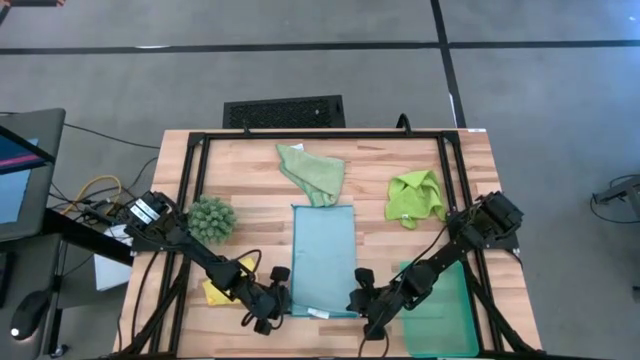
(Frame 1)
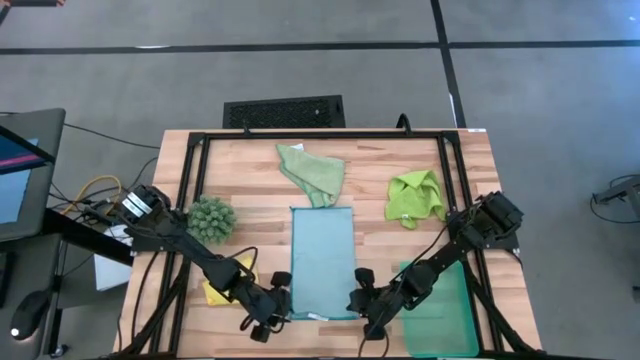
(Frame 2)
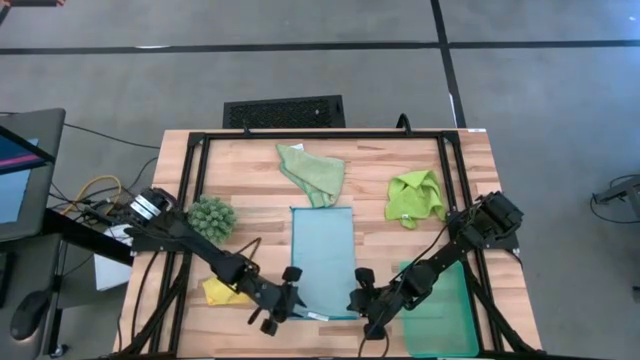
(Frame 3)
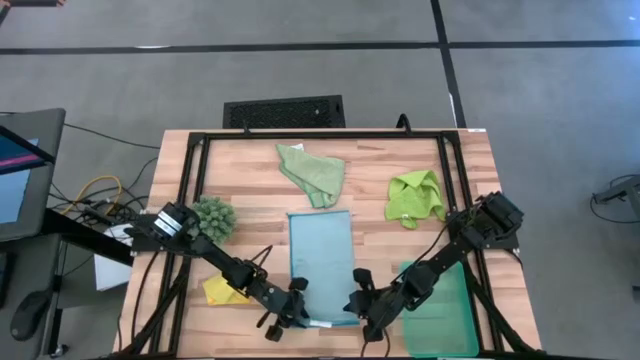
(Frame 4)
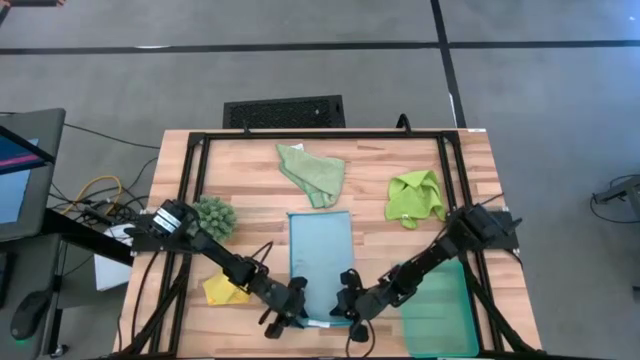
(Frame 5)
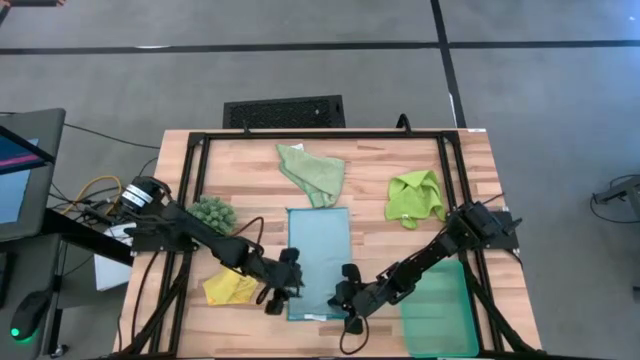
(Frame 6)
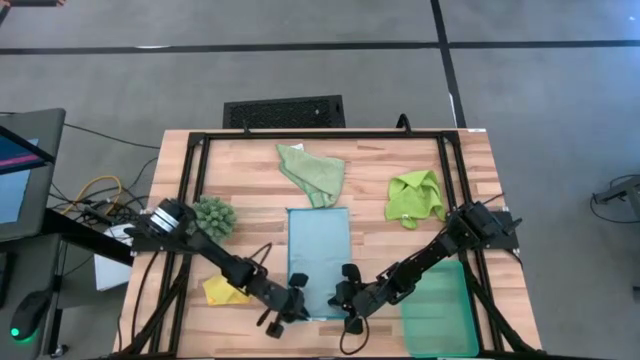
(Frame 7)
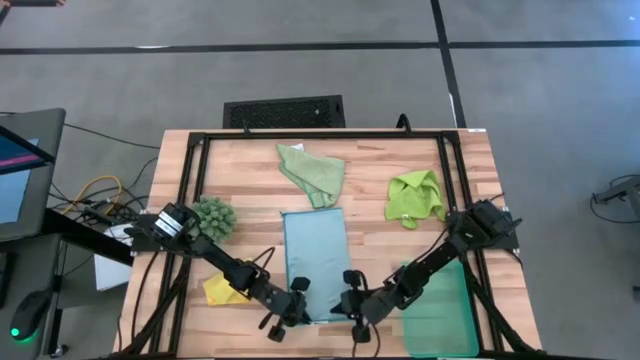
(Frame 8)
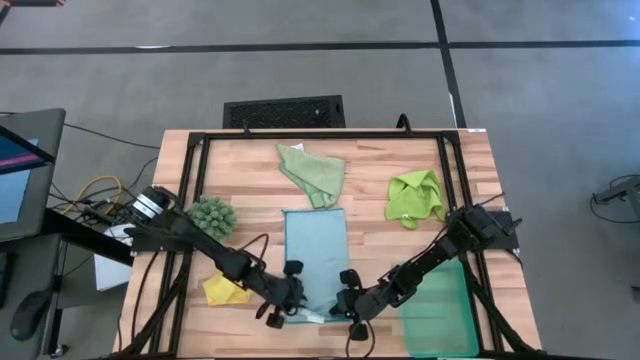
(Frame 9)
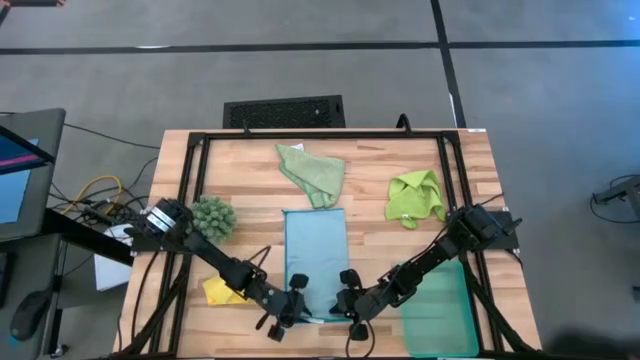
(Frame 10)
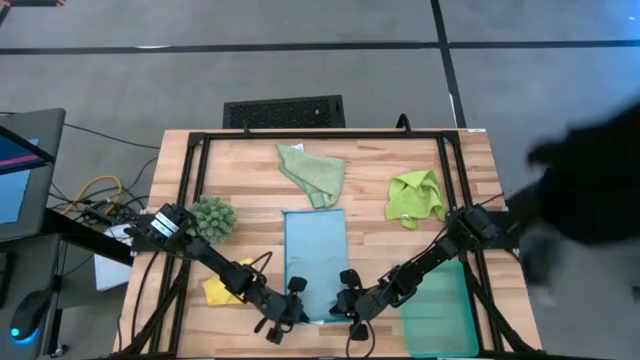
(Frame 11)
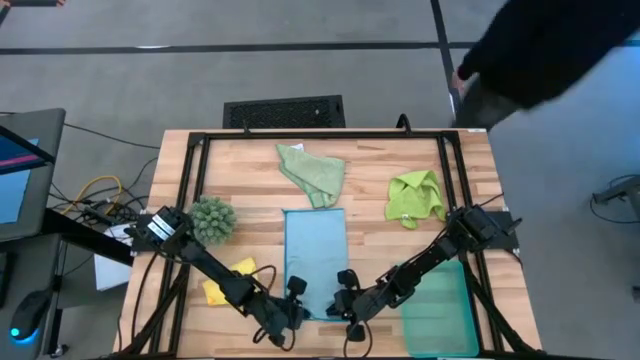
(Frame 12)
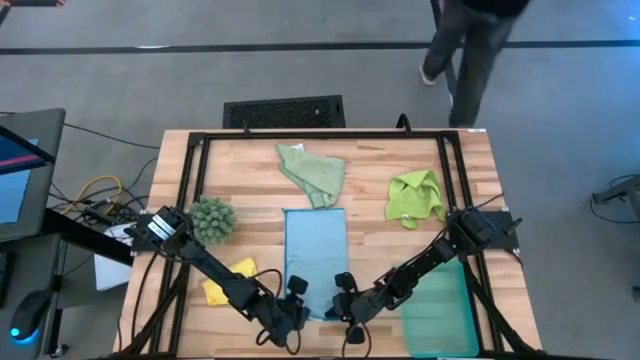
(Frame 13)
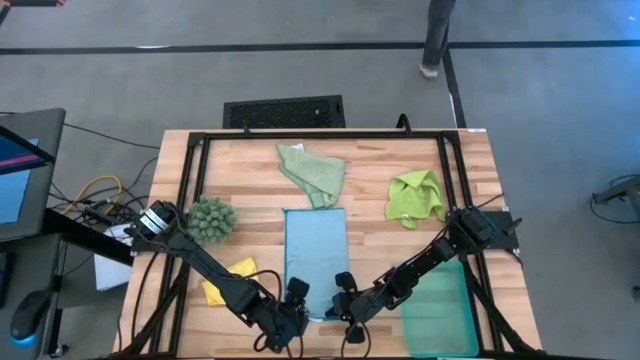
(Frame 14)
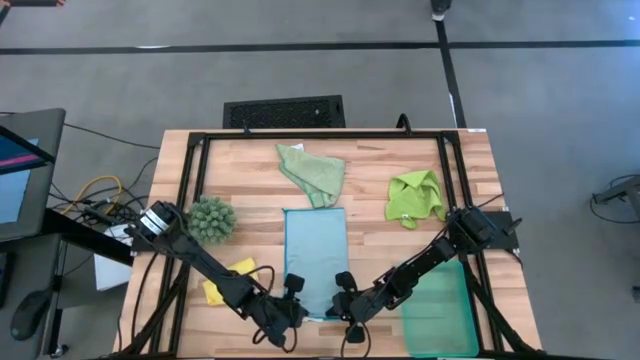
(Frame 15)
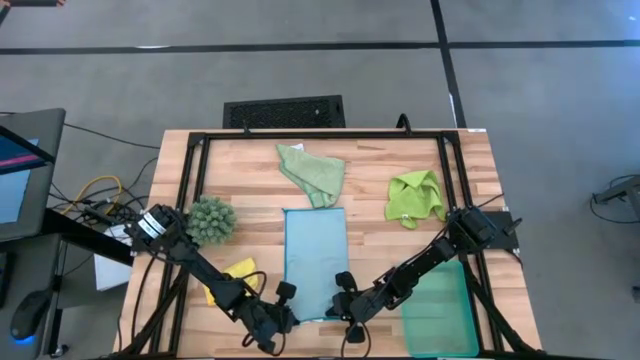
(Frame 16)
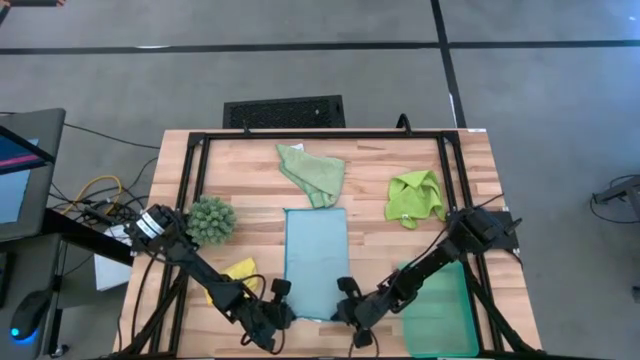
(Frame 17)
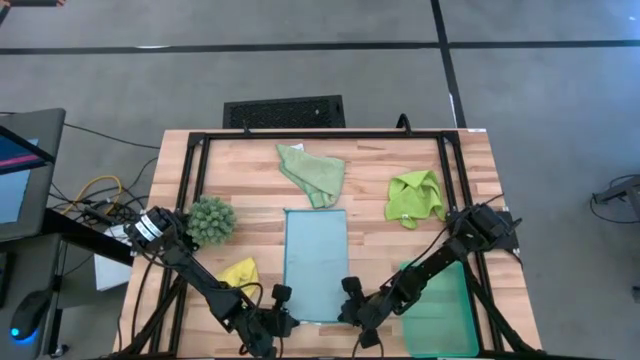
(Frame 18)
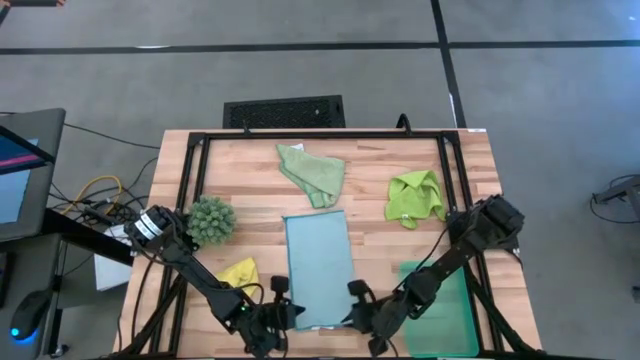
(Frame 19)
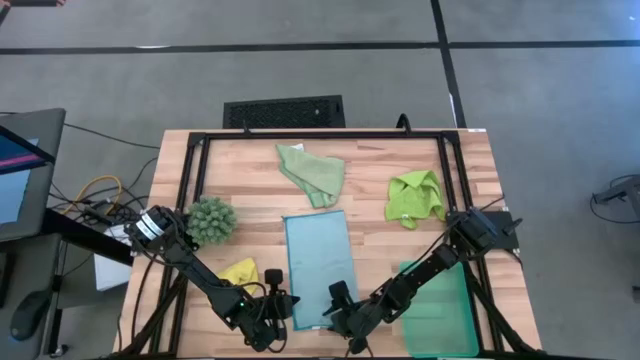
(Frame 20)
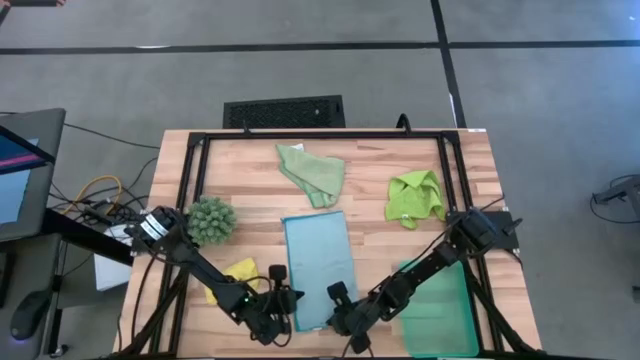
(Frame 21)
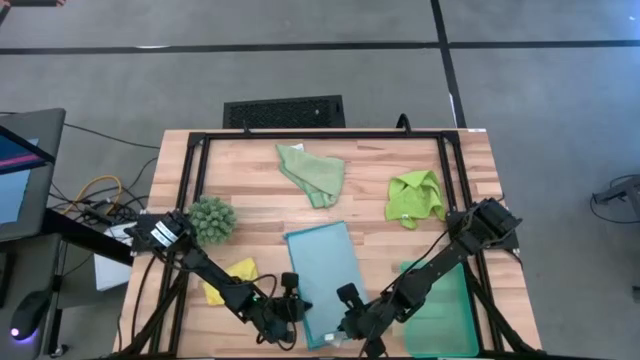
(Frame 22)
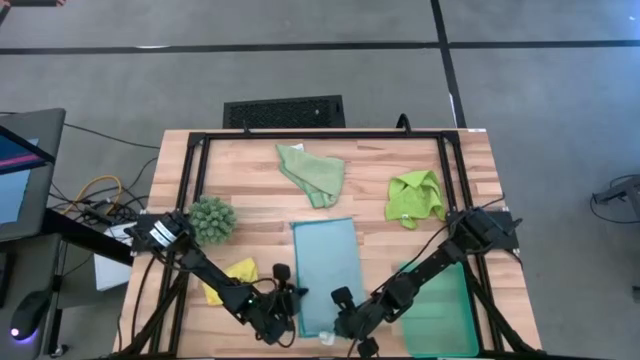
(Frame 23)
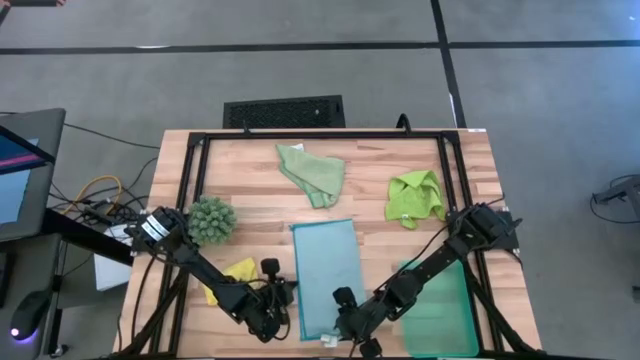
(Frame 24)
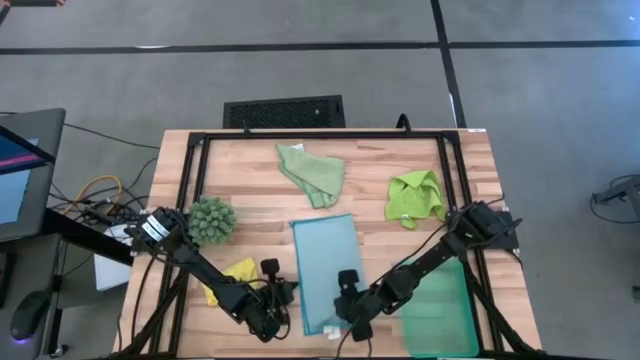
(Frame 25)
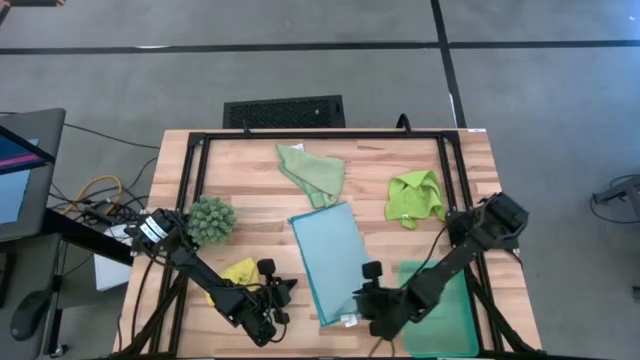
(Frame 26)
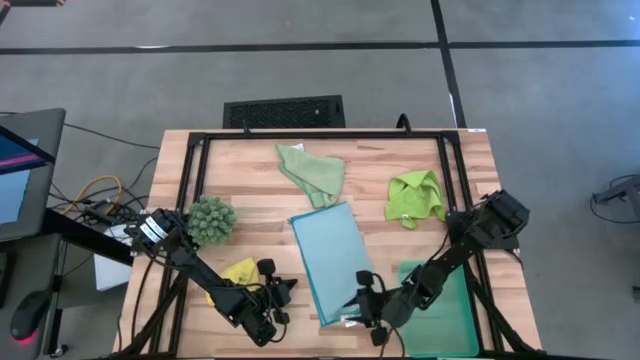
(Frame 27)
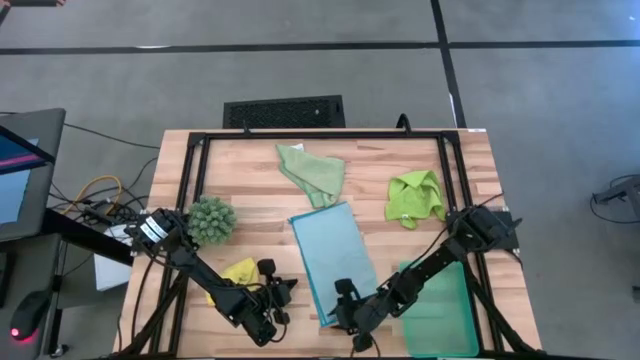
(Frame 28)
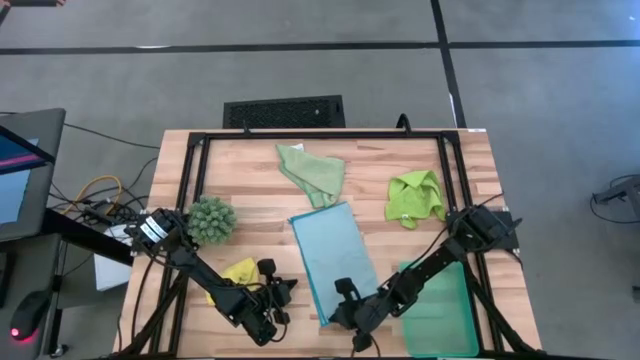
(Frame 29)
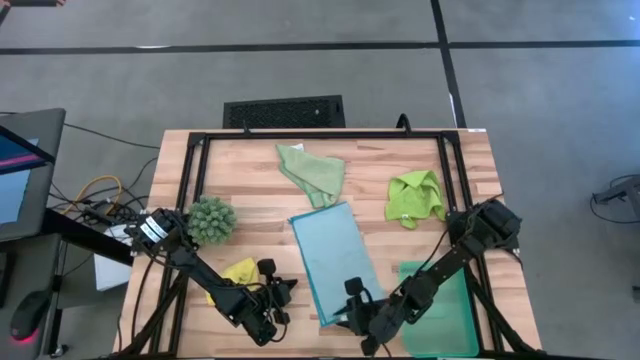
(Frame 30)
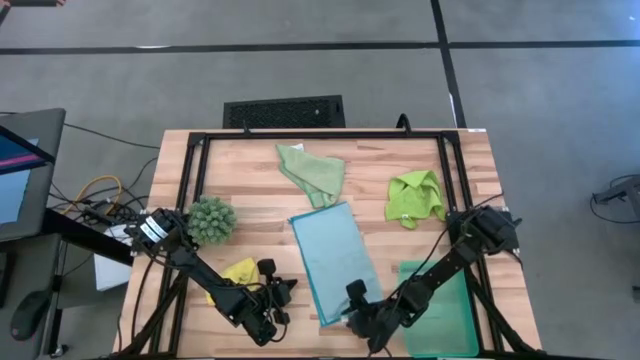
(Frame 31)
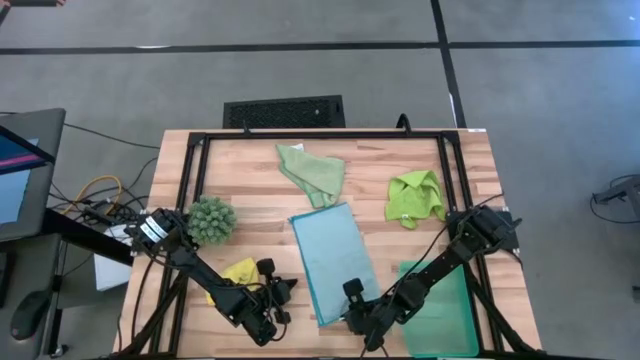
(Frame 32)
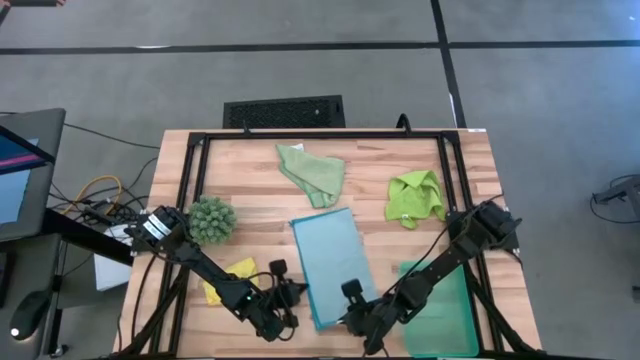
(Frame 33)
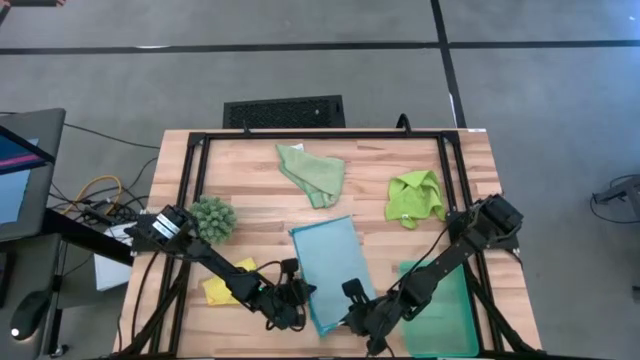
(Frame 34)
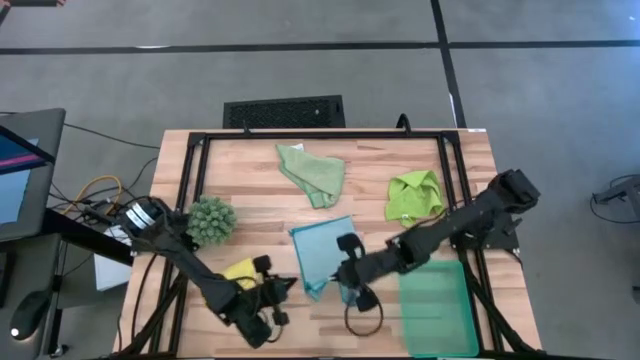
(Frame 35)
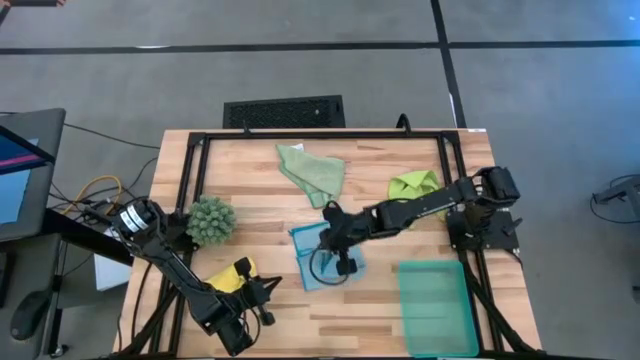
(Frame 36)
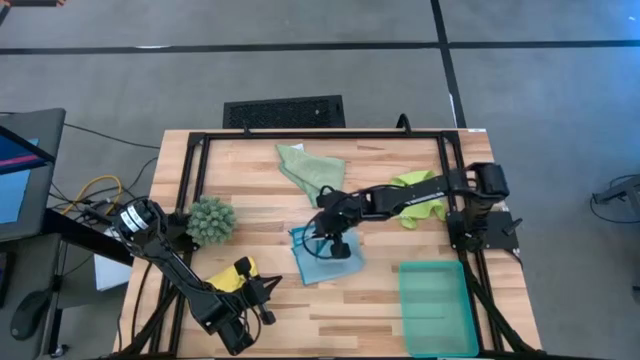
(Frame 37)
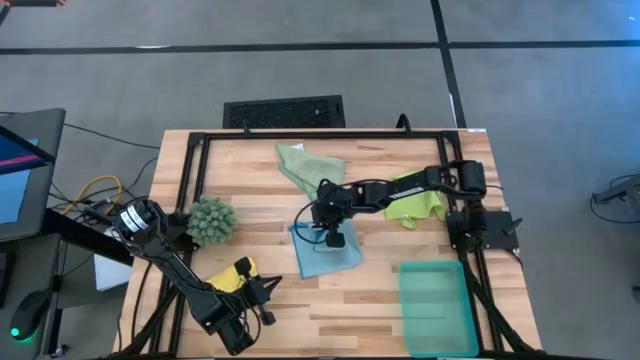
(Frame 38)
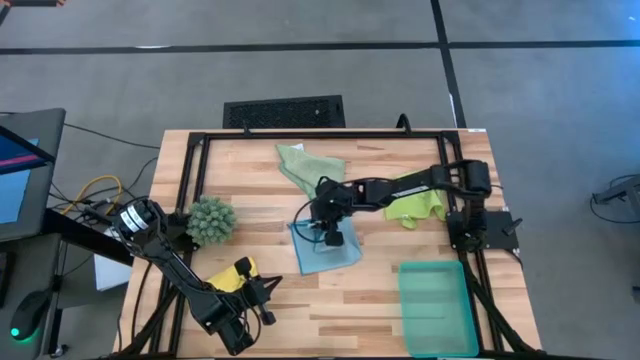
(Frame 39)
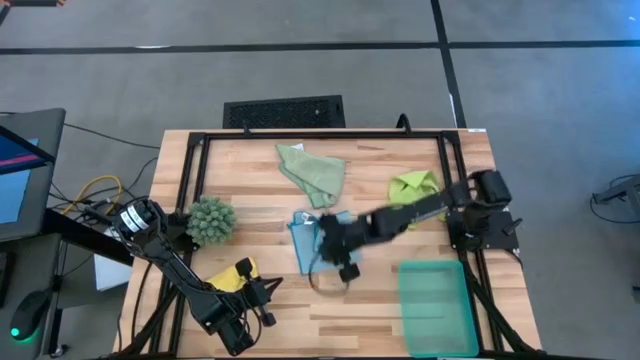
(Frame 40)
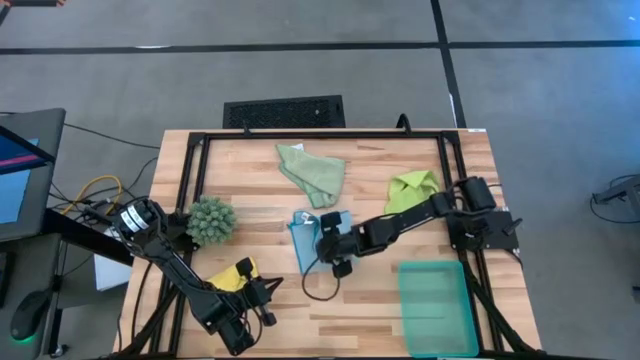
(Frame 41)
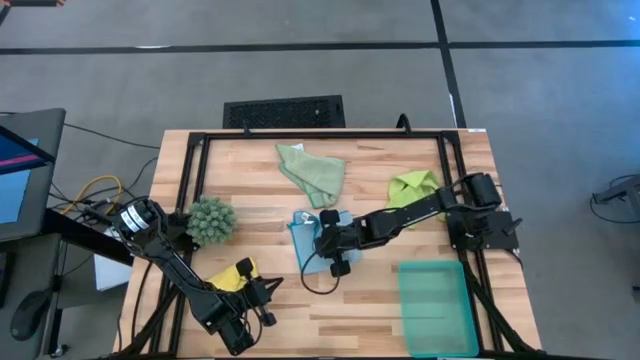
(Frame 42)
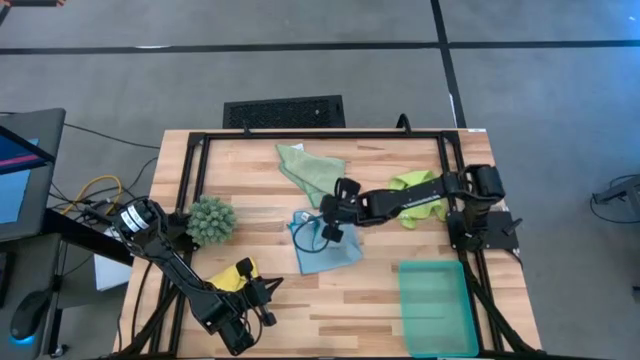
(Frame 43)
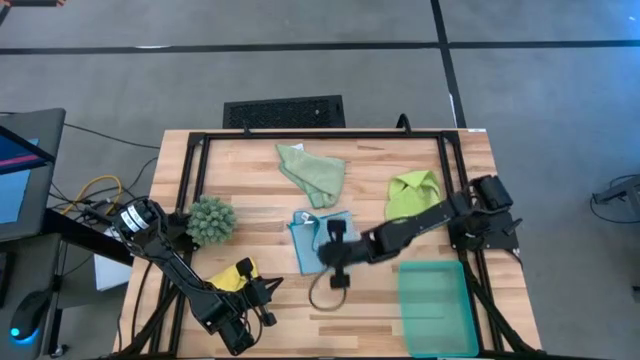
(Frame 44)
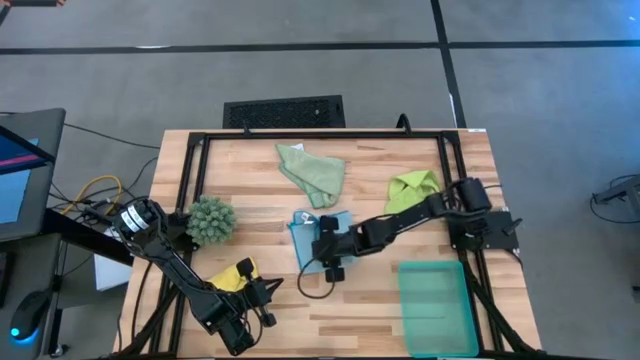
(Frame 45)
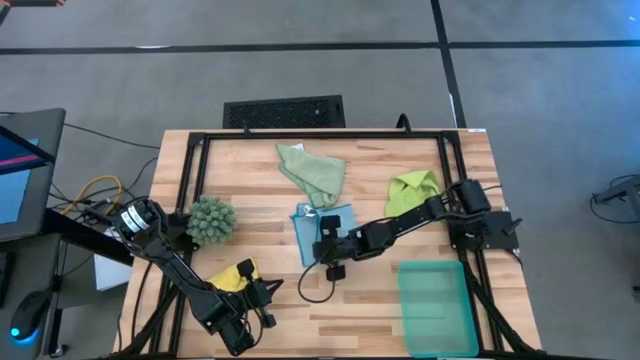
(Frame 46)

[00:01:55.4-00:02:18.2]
Task: Fold microfiber towels
Fold the blue microfiber cloth
